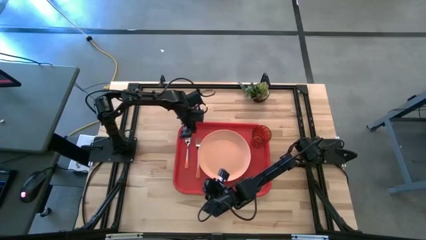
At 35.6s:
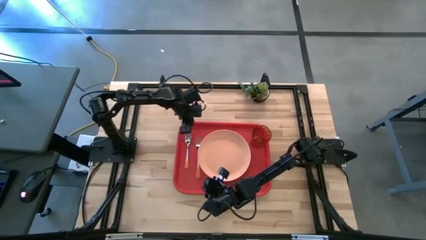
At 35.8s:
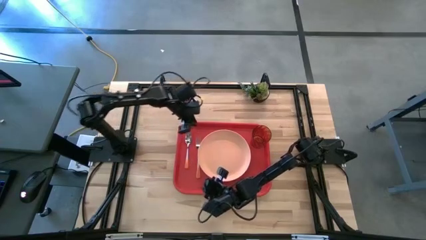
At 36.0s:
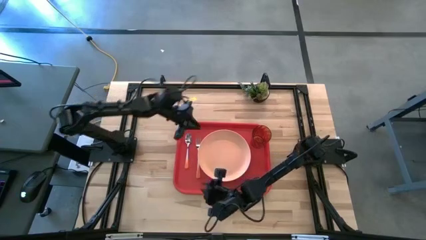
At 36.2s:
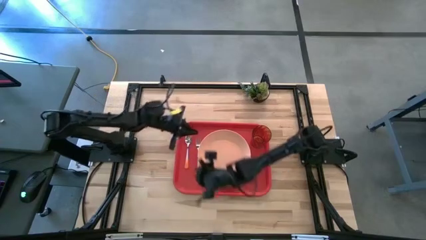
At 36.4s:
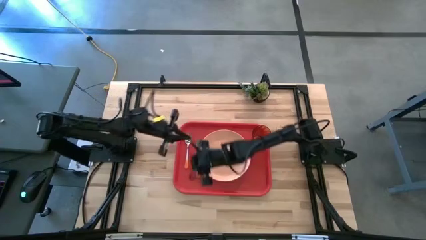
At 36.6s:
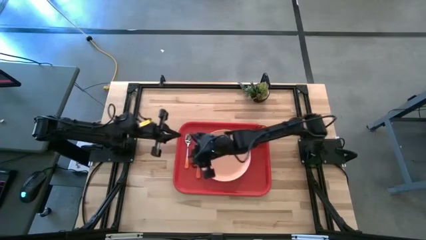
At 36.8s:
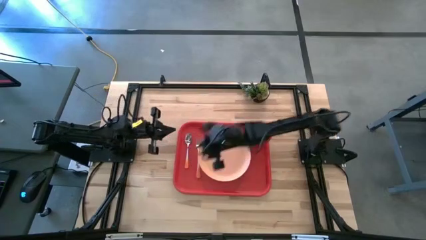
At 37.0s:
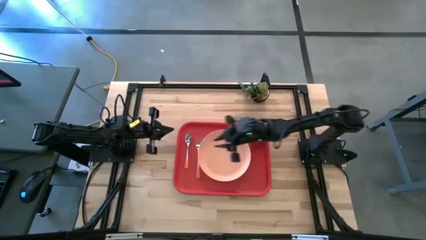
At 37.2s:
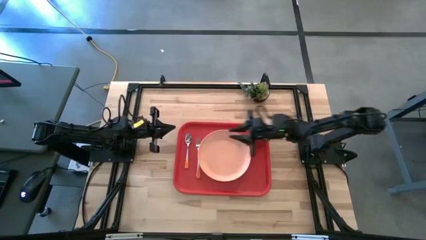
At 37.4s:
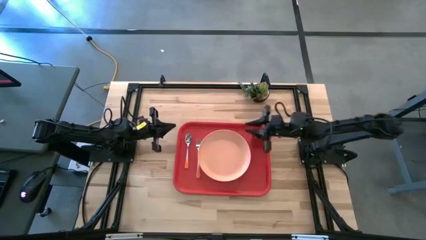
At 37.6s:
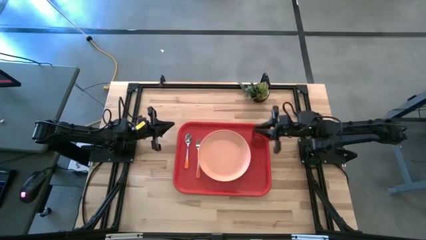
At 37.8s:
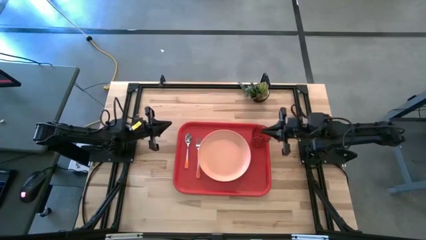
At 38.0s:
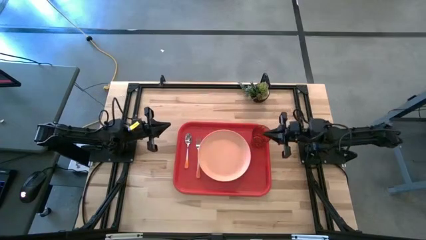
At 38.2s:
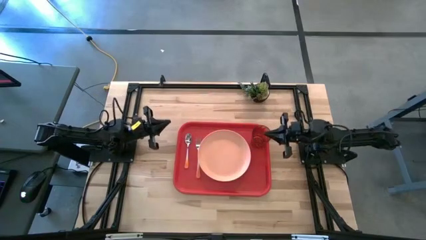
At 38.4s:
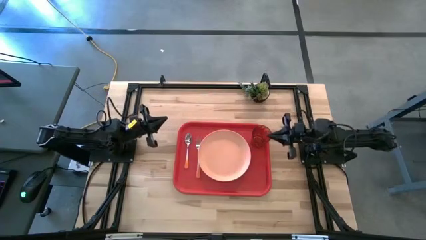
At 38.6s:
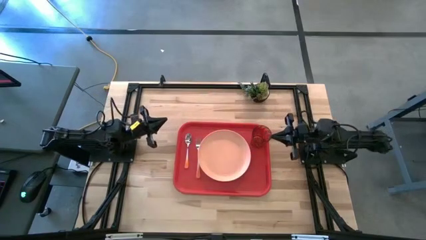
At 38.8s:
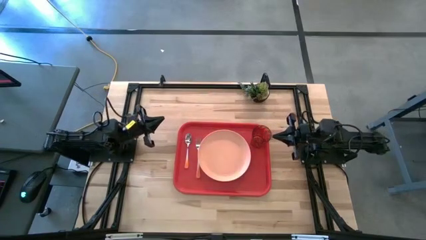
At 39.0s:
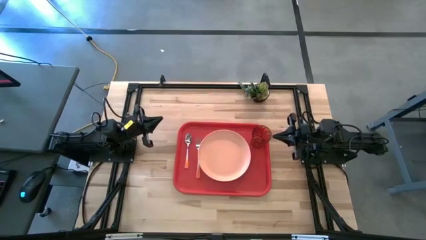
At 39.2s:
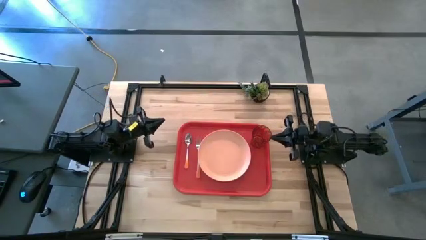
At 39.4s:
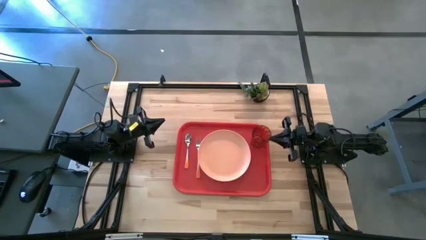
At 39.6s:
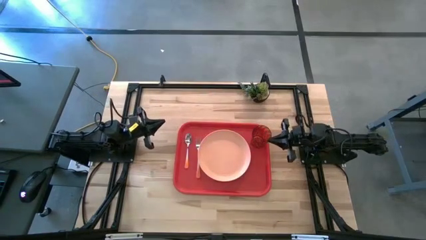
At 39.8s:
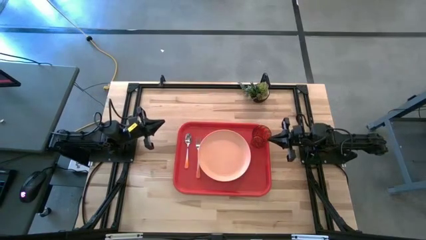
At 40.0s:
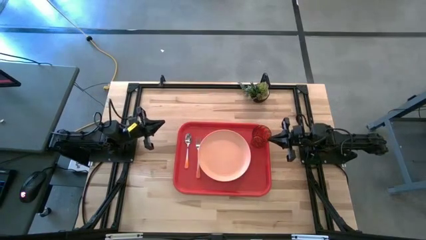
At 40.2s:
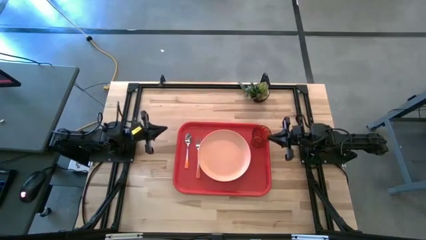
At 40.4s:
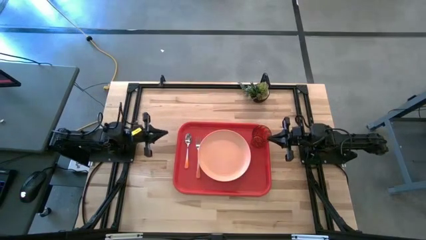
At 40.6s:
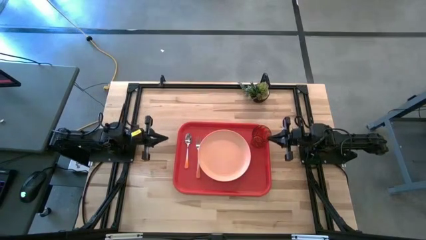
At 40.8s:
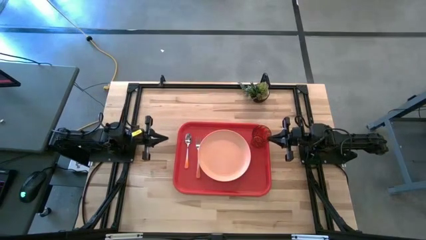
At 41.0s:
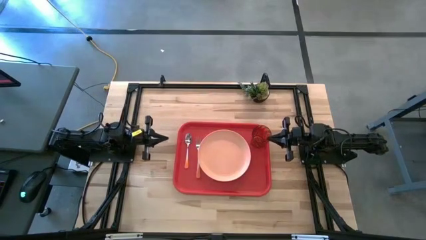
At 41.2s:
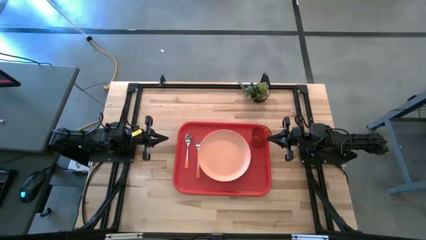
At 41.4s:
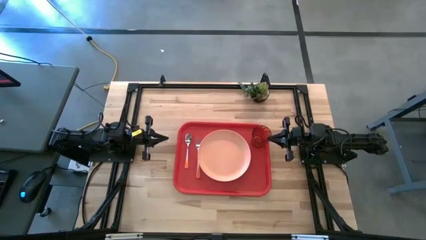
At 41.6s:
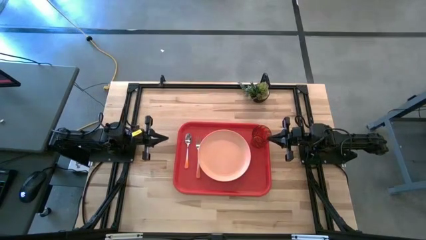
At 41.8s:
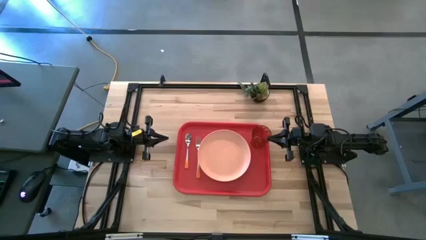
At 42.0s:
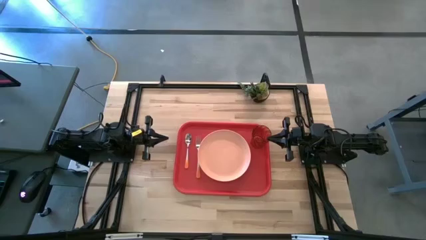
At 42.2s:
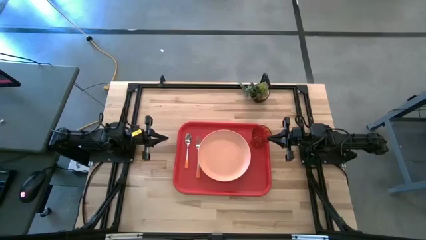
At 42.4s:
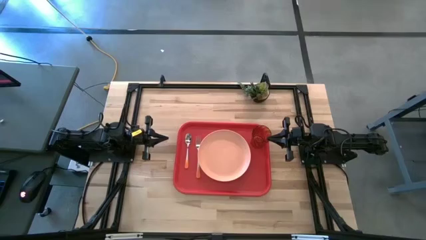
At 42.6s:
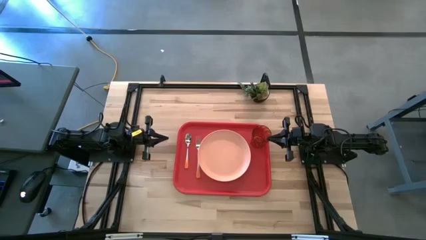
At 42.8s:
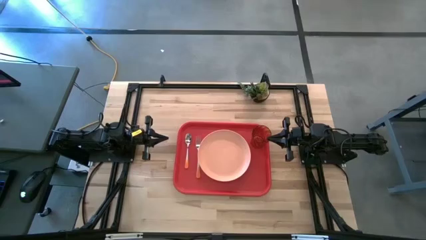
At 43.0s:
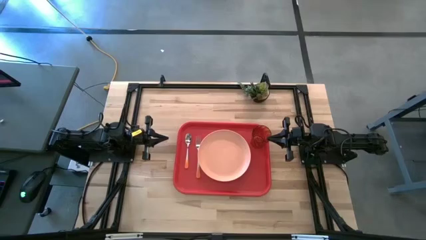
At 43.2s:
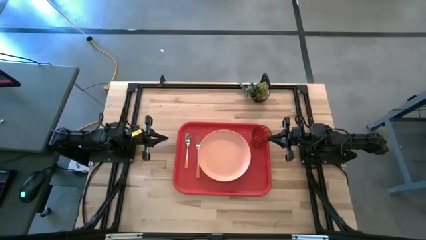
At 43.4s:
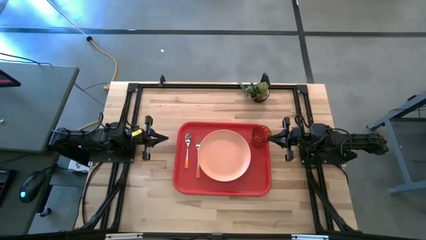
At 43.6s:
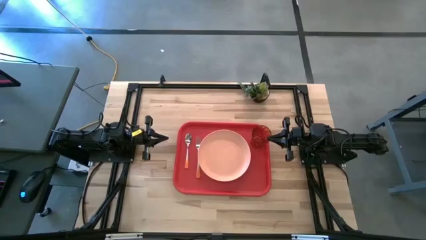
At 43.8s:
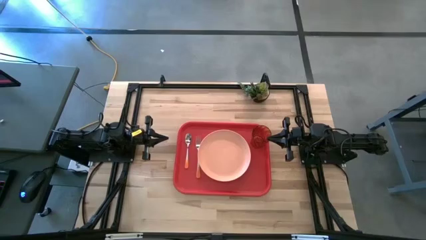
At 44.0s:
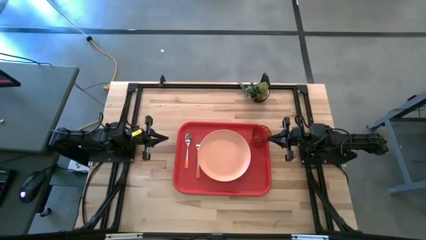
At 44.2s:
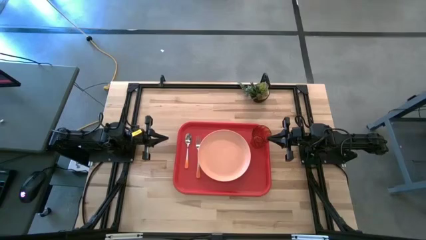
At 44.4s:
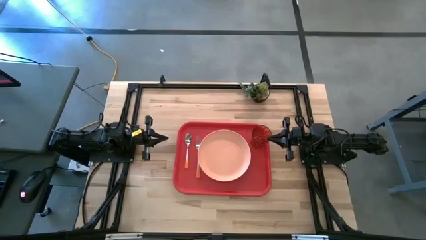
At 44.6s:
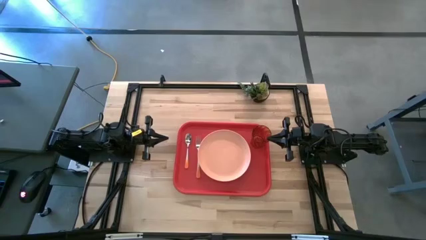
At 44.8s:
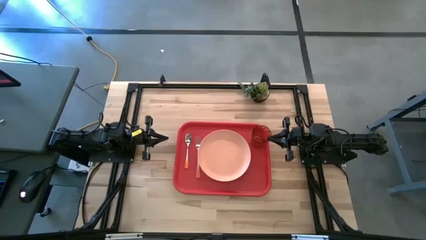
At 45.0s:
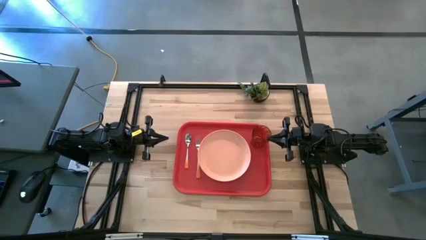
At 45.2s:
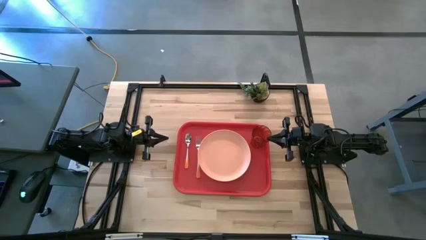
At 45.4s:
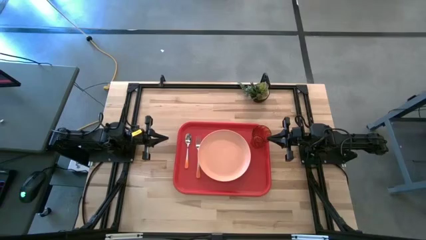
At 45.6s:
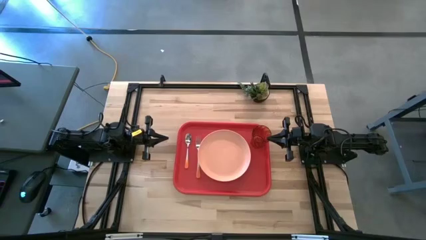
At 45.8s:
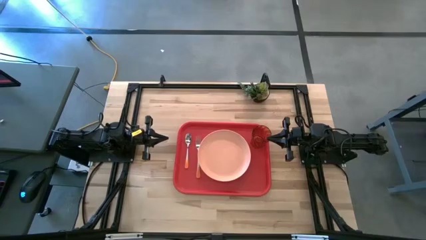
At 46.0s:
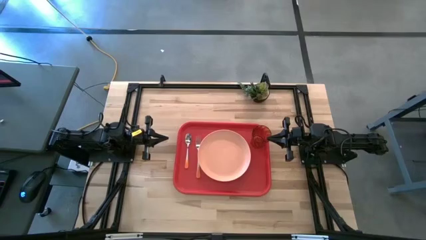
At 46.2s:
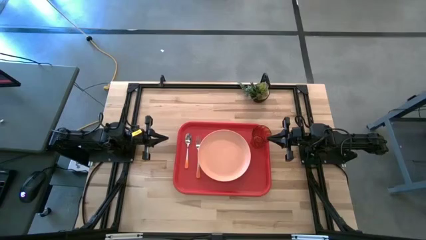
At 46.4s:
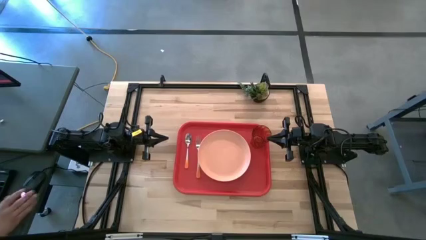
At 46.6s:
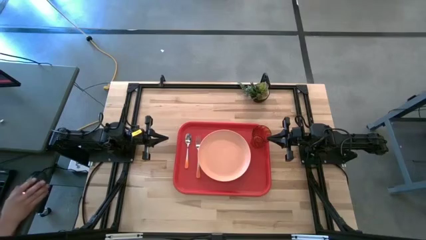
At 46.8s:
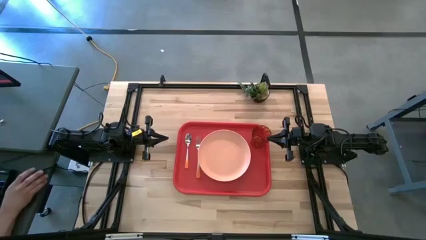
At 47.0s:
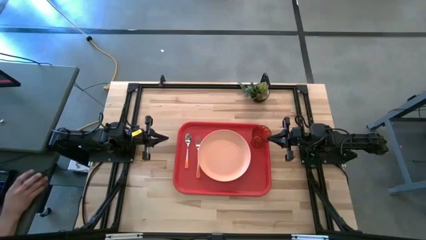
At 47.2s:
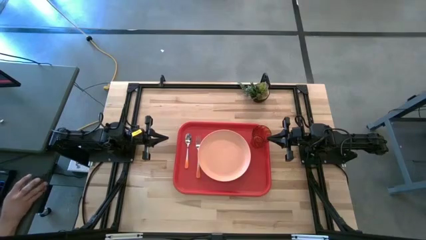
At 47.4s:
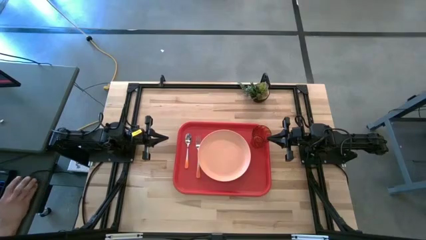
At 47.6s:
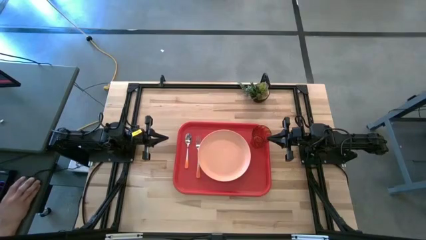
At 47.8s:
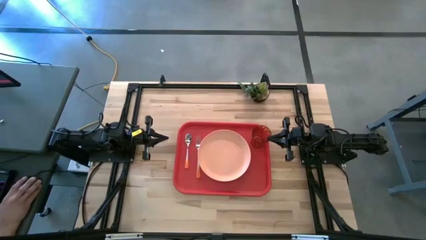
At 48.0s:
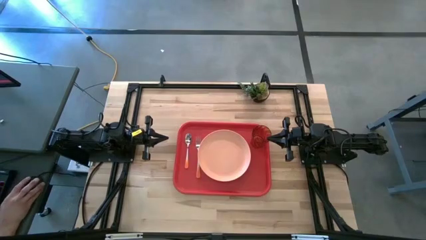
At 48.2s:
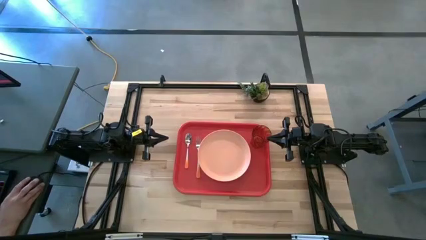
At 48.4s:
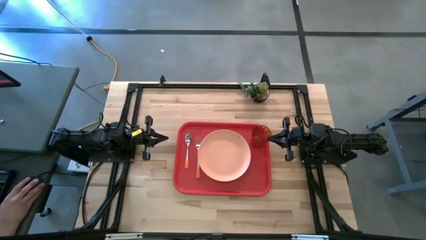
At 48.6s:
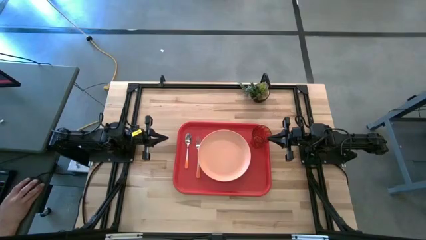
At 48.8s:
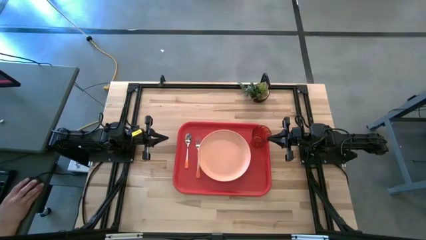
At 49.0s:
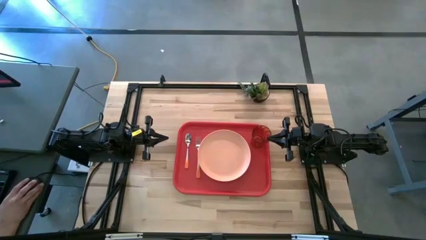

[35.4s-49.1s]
Task: Pick and place plate/cup/fork/spoon on tray
Return to Home Position

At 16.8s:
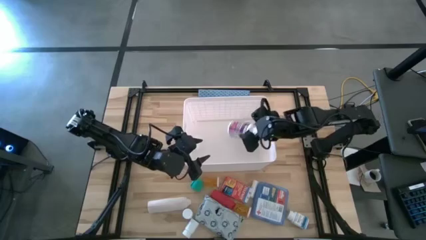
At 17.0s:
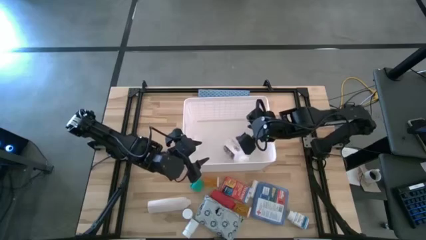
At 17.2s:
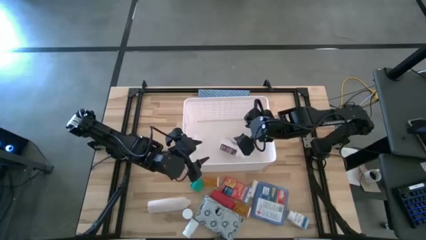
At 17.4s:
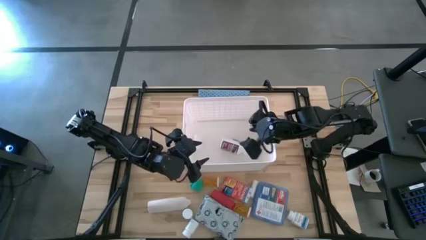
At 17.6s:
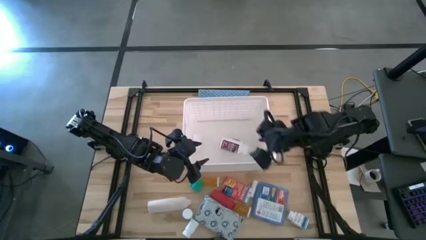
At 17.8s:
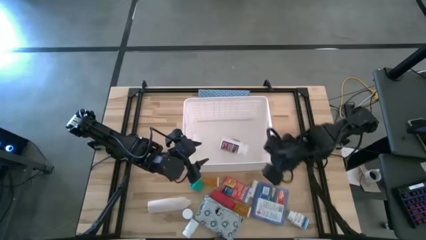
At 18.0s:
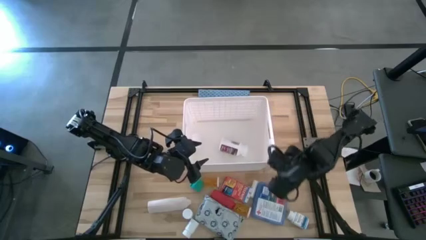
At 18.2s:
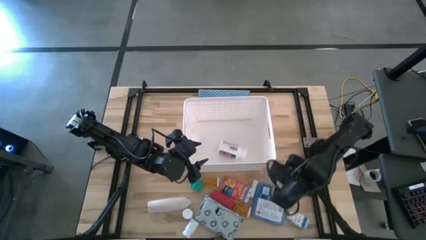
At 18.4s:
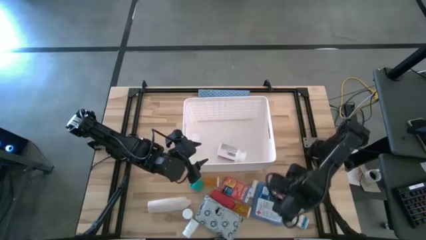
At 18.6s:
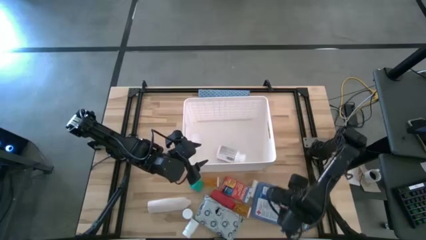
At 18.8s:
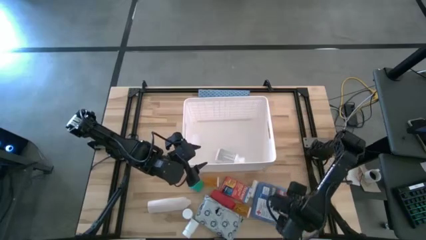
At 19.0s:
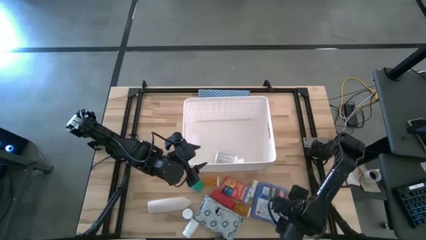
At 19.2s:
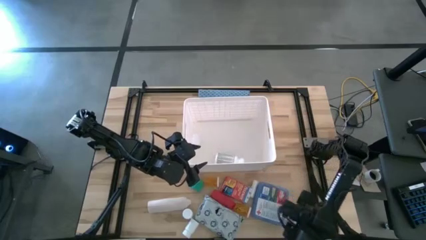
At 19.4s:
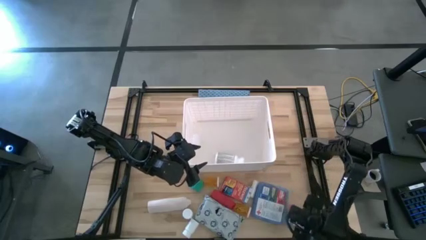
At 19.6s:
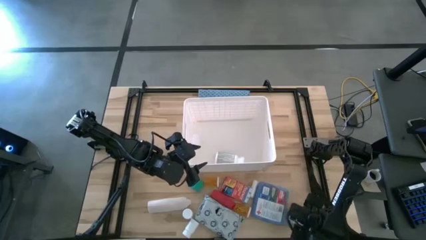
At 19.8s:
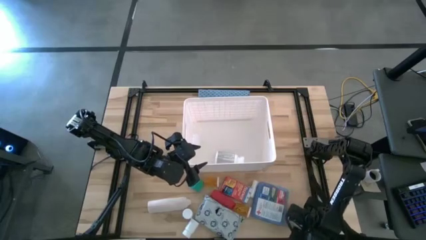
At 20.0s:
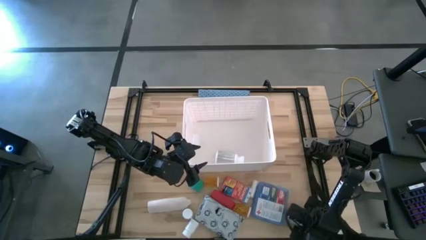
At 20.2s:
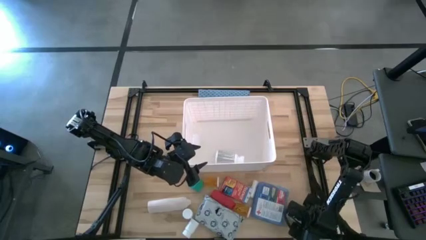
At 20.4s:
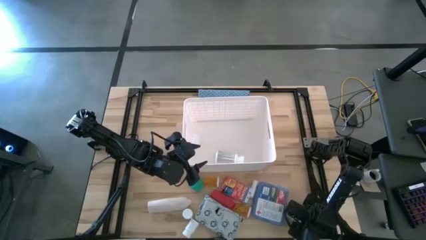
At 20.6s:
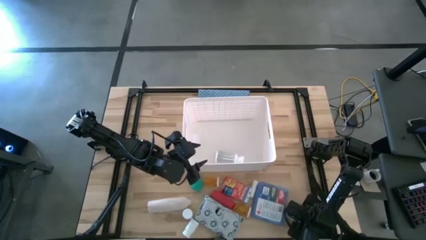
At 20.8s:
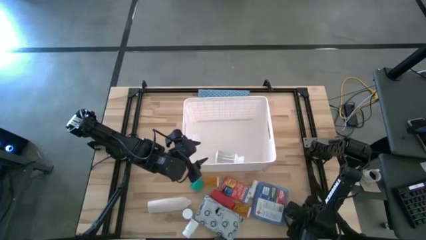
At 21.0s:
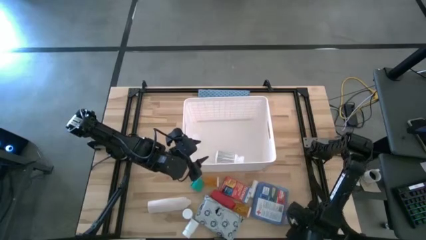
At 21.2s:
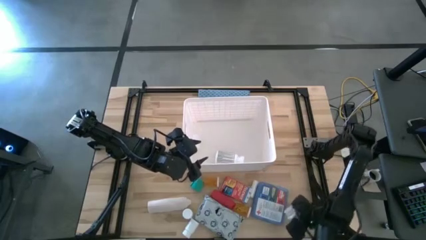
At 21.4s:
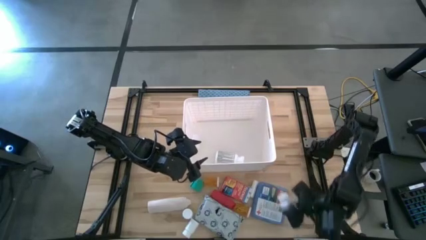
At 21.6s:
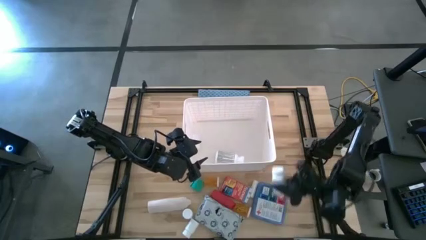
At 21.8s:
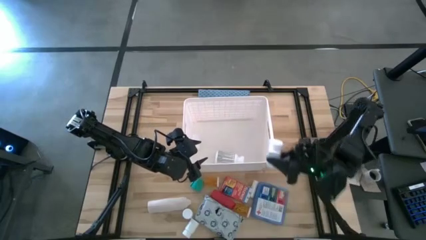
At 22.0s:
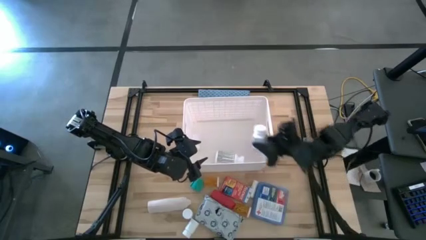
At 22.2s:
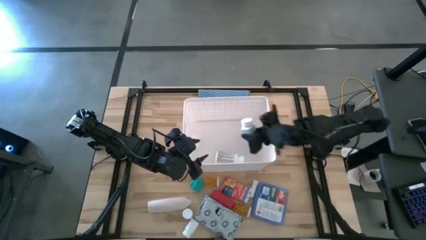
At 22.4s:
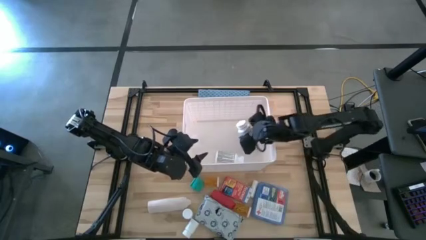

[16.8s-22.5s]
Task: Pick & place medical supplies in basket/bin
Put the white and blue medicine bottle into the white bin
